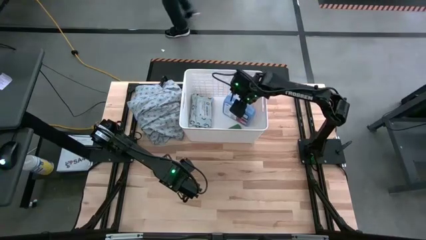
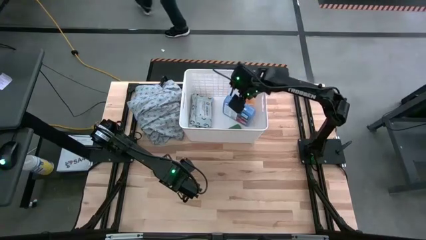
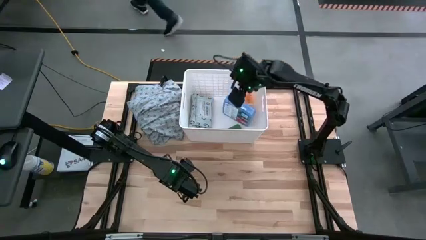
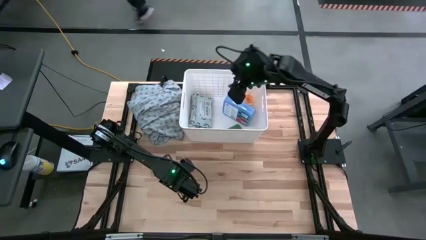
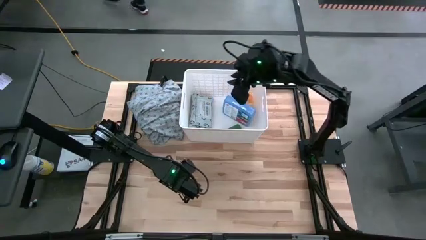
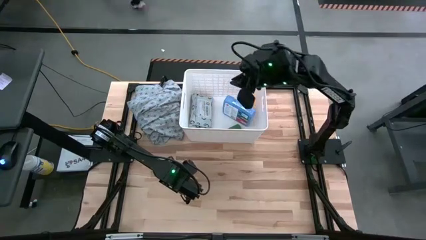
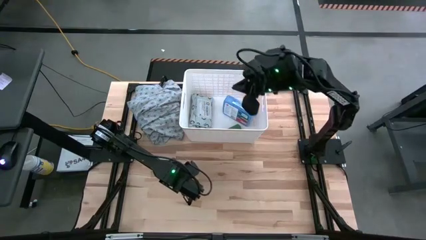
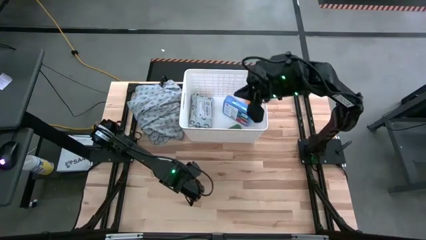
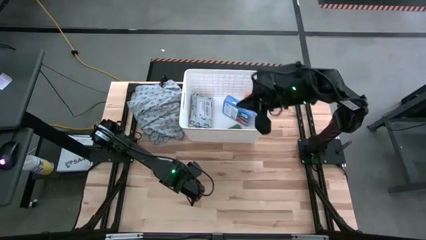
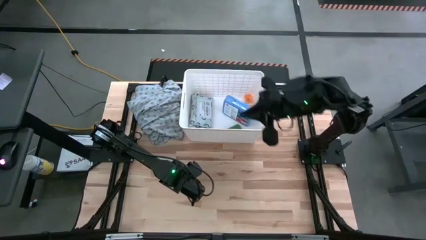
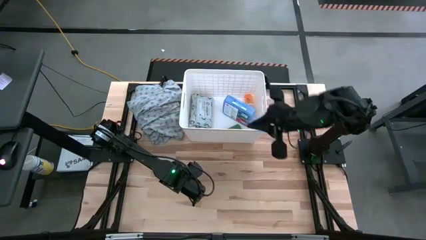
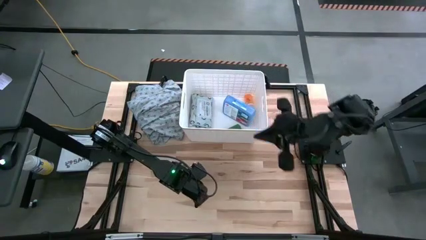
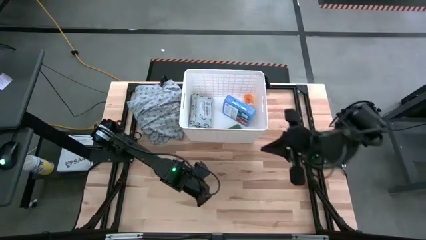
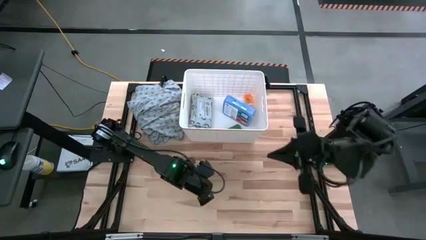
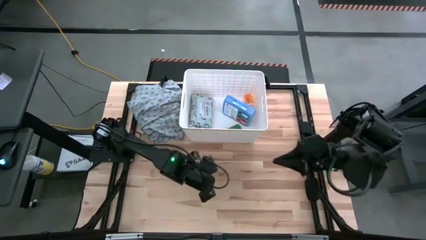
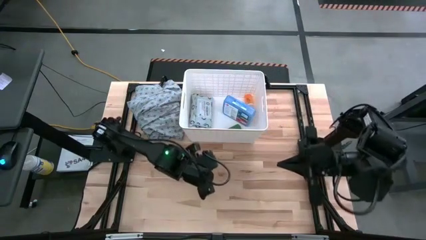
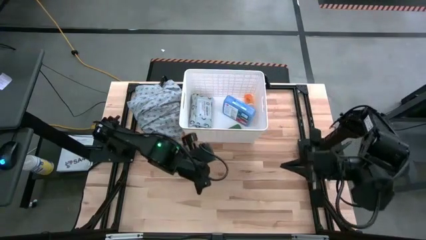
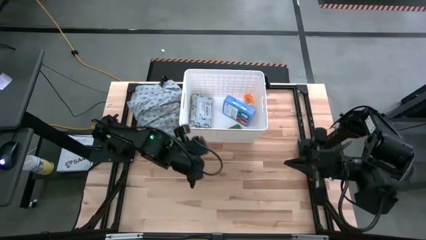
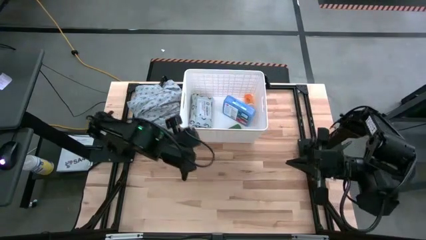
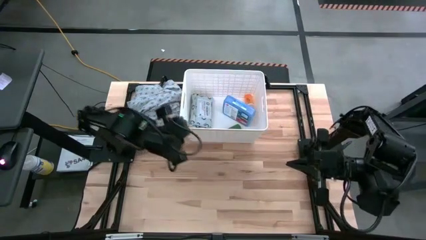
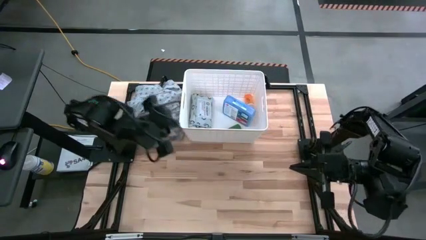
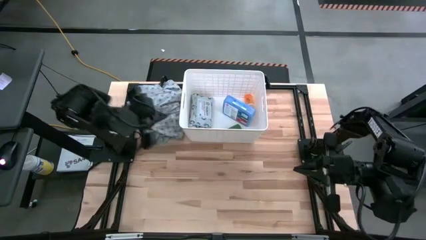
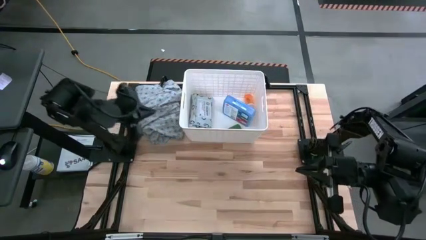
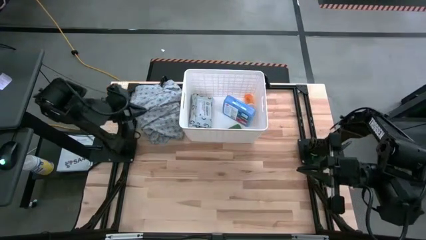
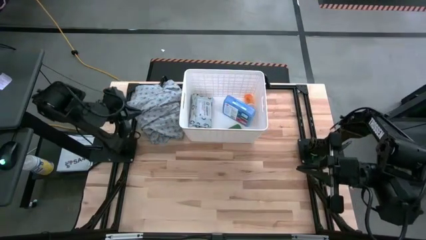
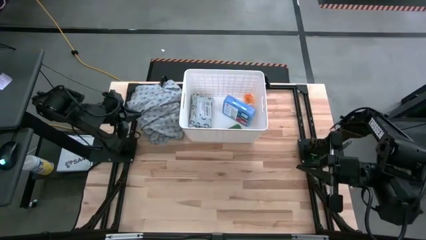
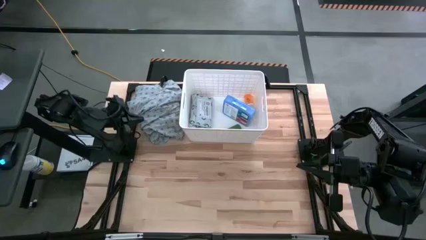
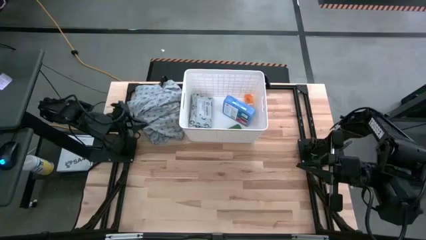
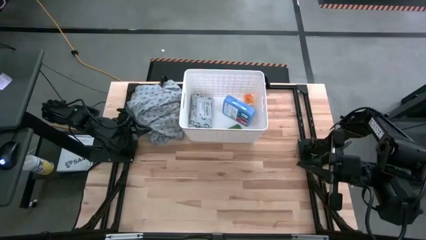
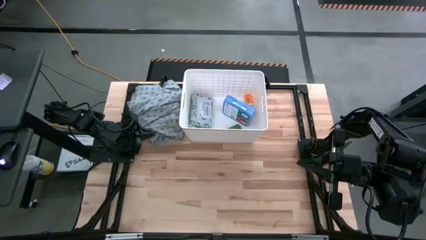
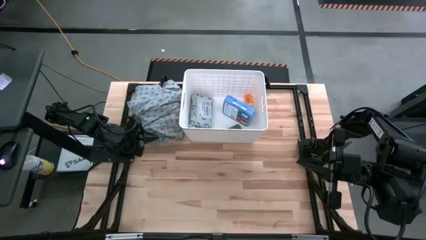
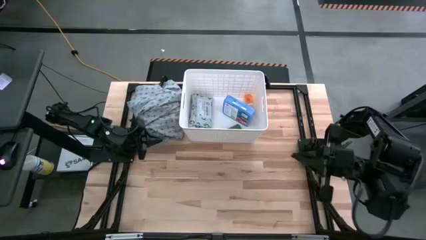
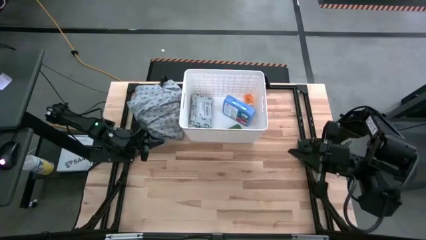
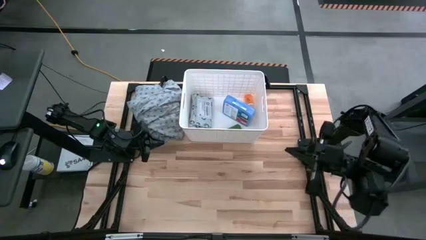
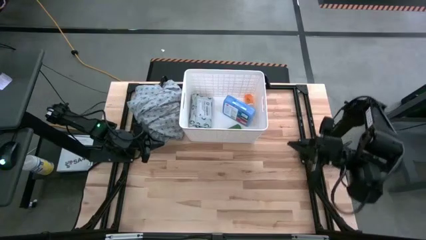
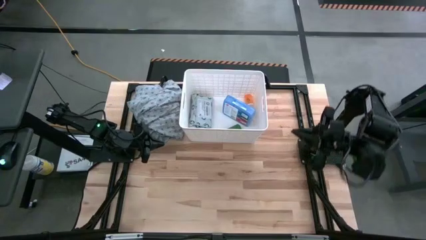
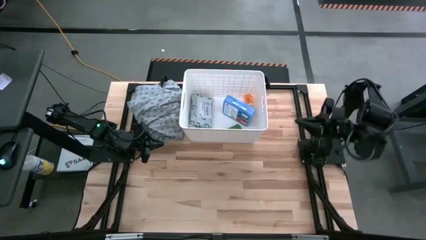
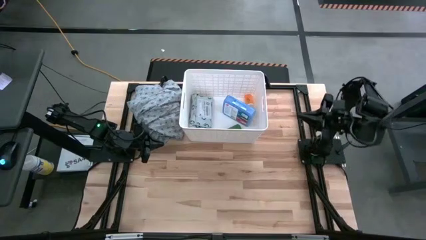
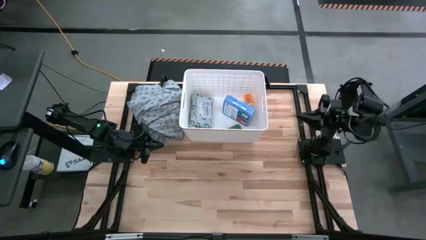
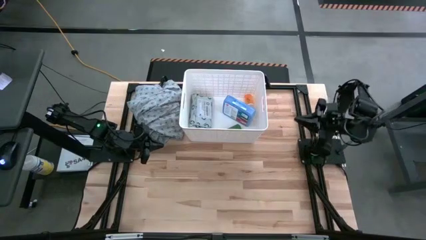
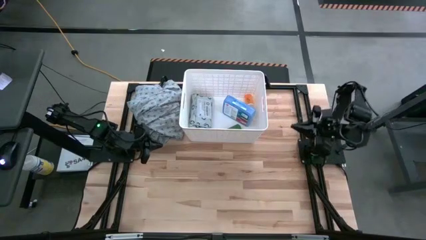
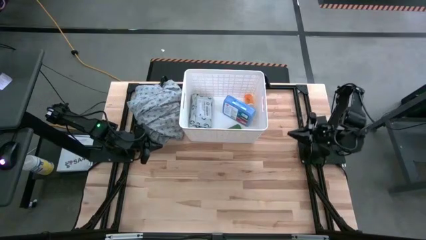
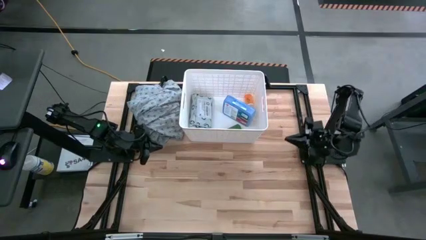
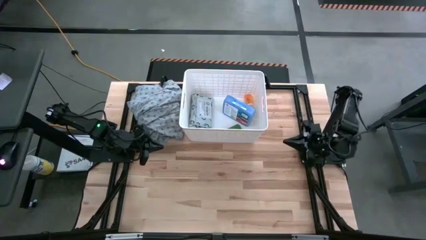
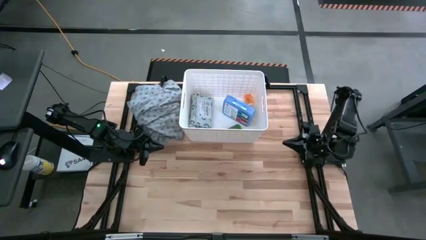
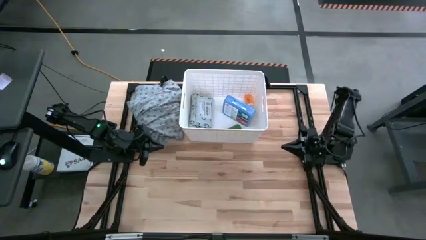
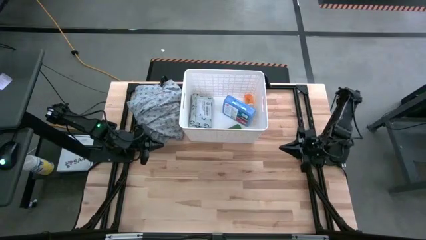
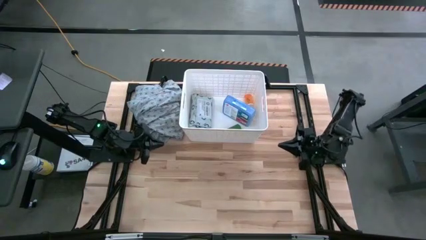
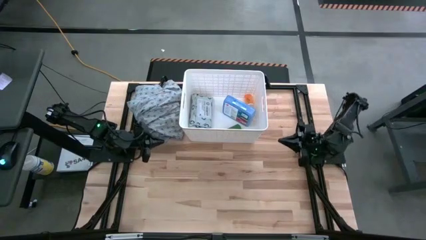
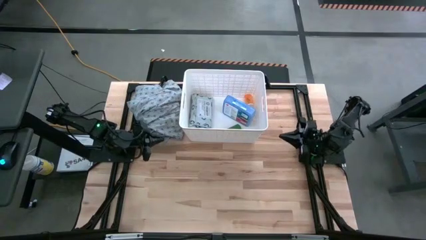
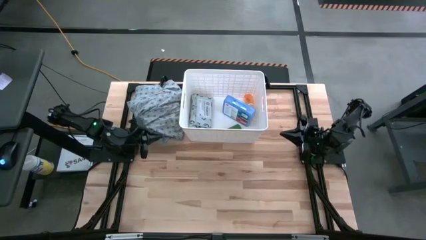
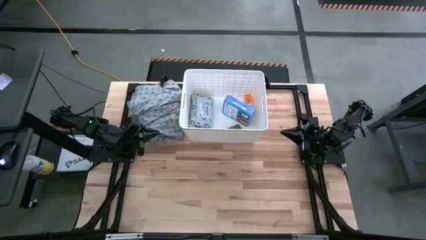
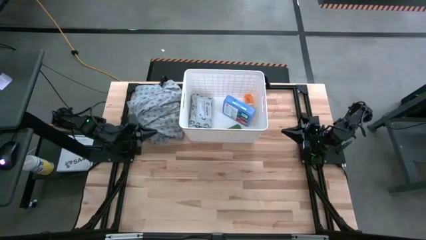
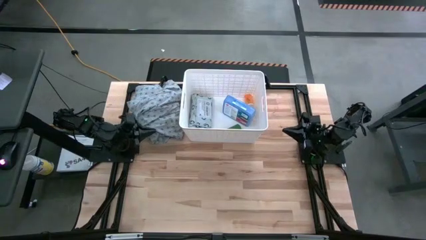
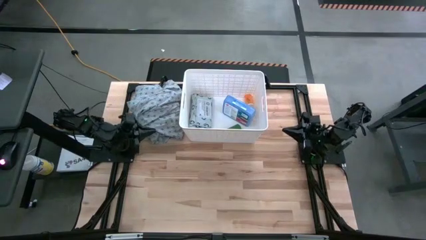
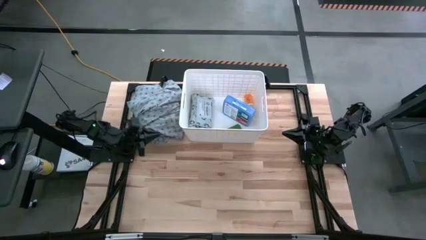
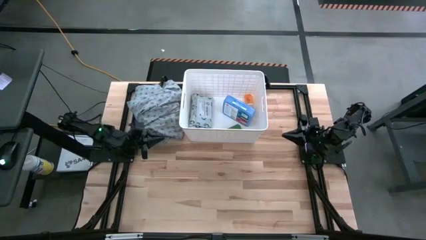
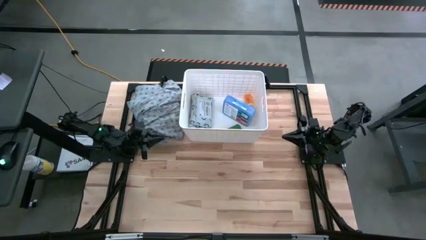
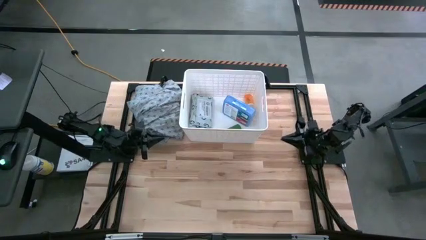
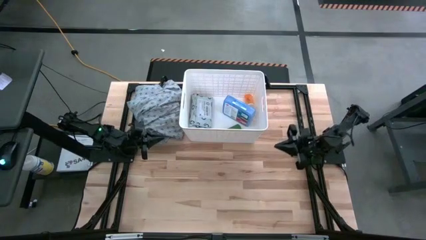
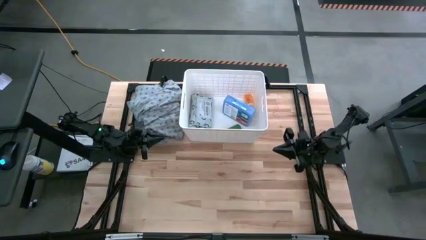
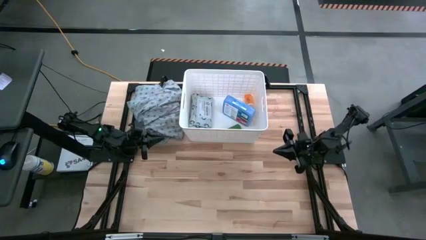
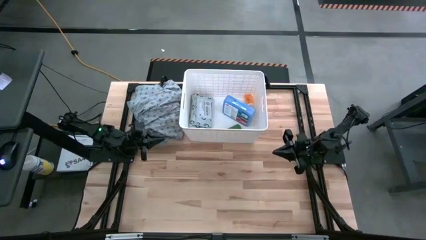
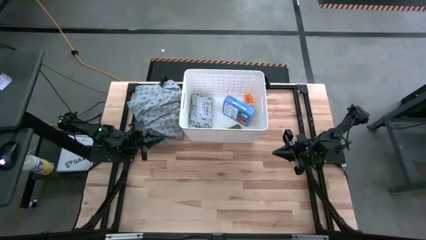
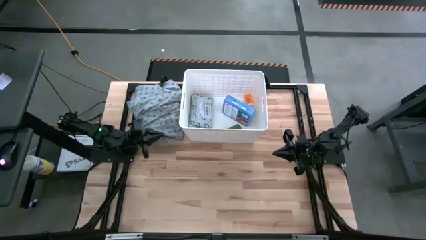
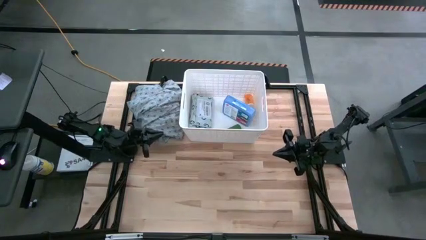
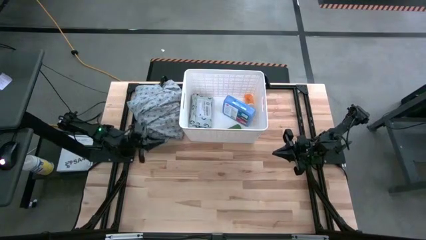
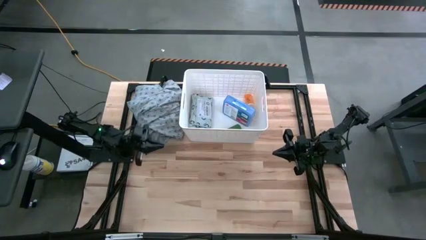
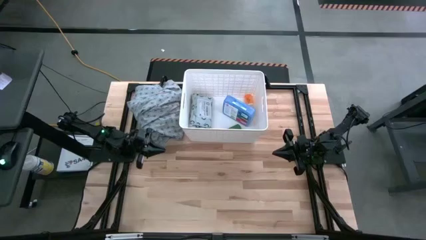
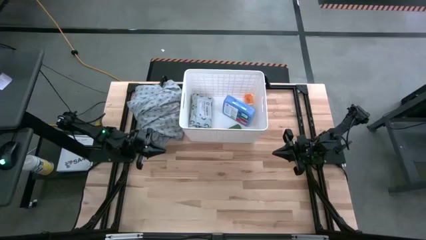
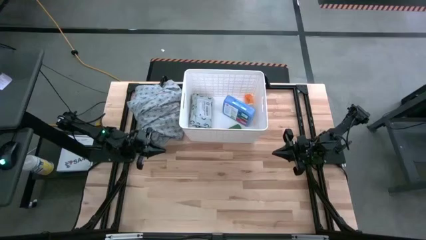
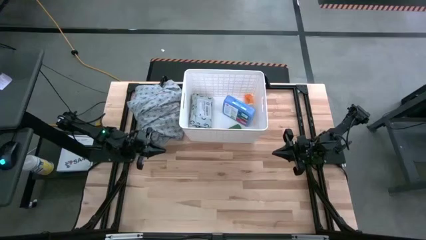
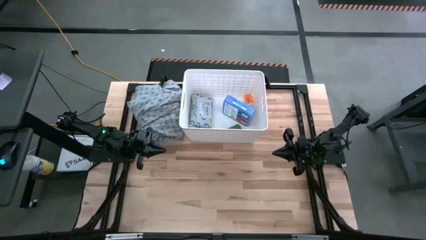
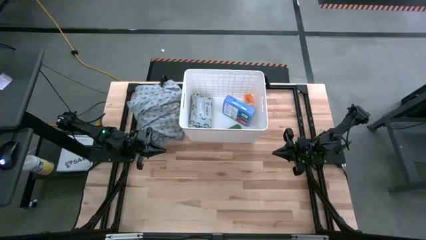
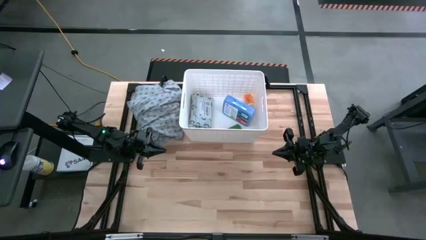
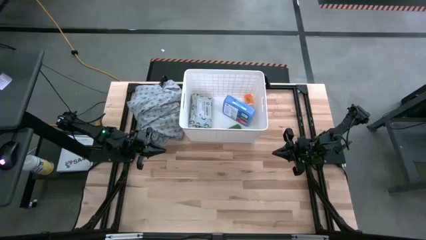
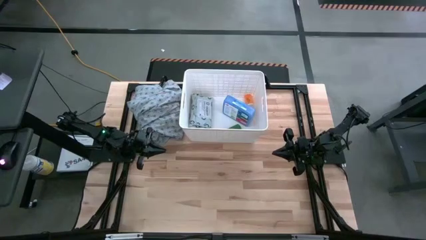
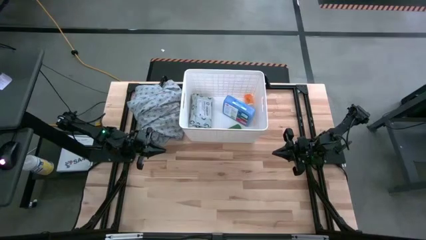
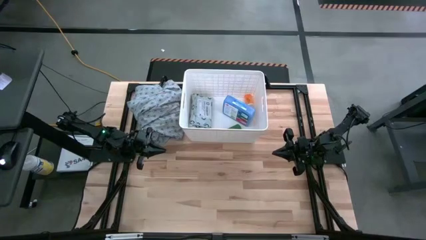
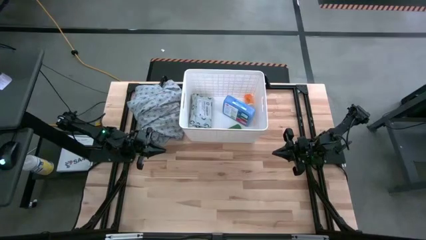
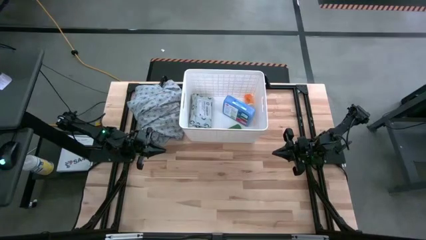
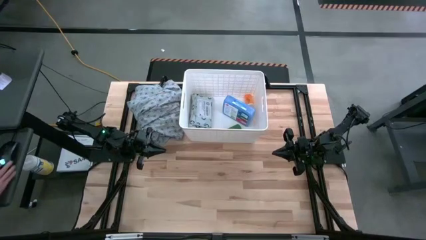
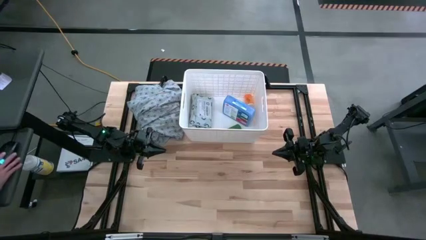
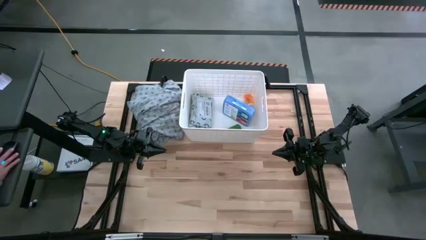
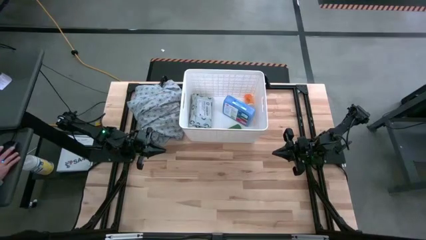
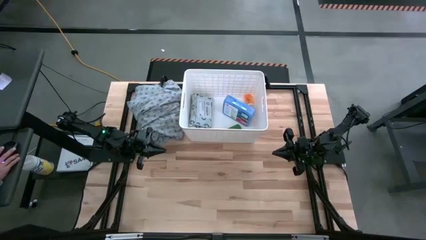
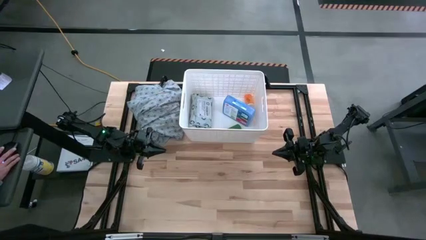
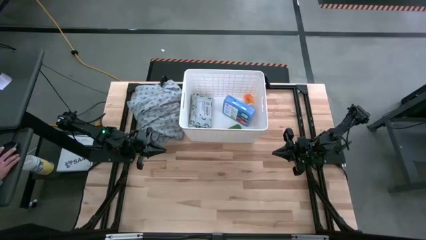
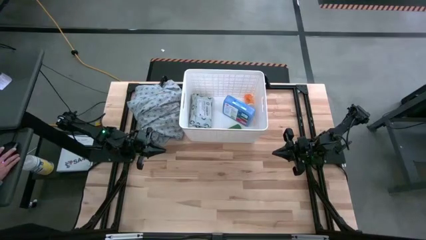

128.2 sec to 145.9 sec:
Task: Pick & place medical supplies in basket/bin
Return to Home Position
